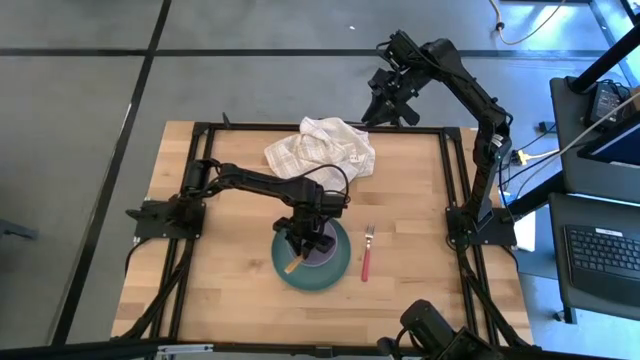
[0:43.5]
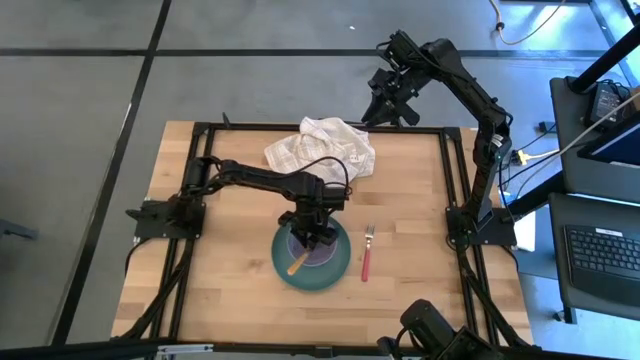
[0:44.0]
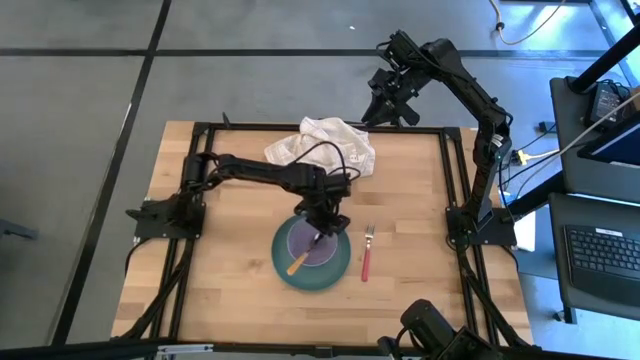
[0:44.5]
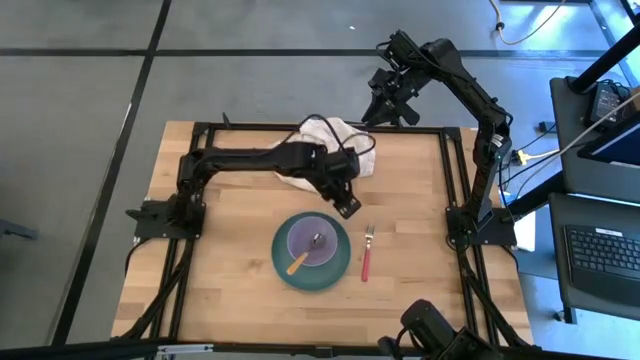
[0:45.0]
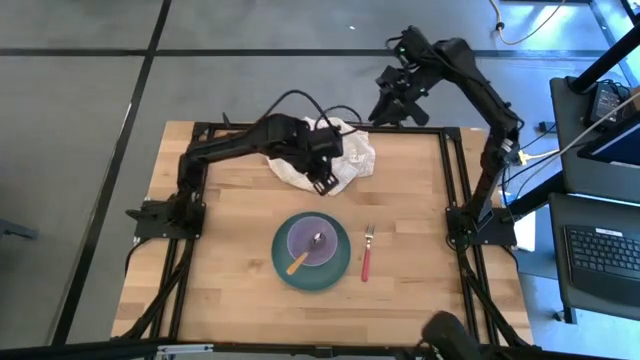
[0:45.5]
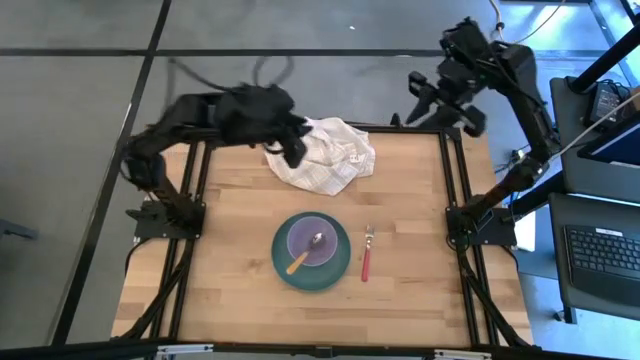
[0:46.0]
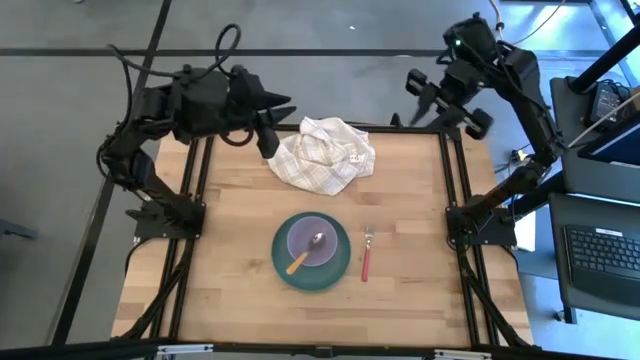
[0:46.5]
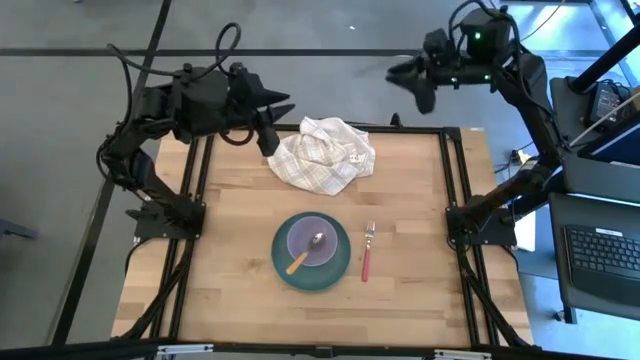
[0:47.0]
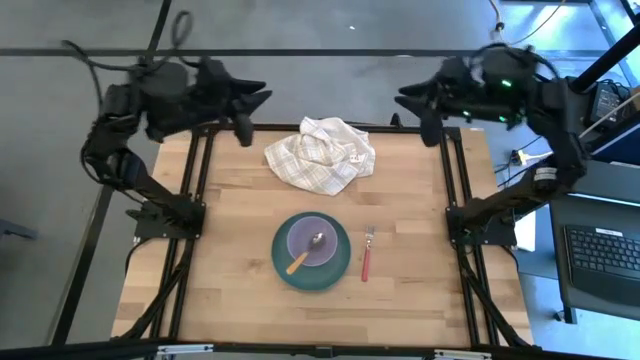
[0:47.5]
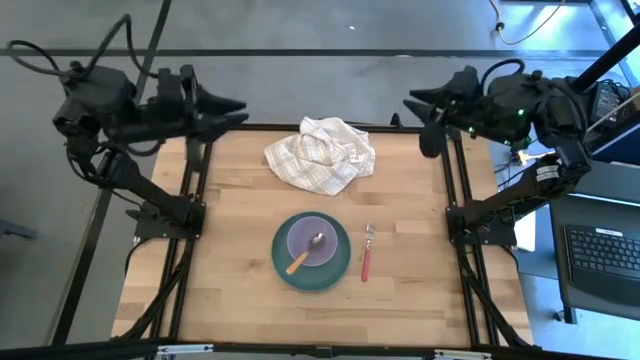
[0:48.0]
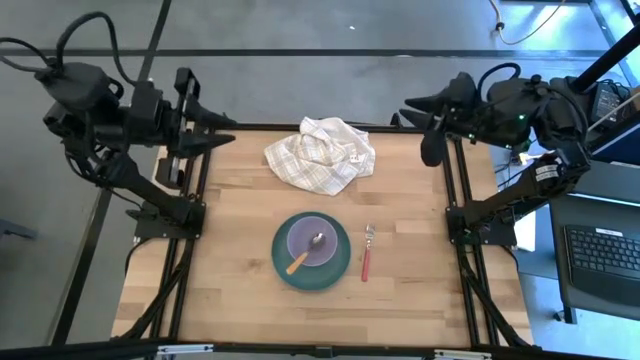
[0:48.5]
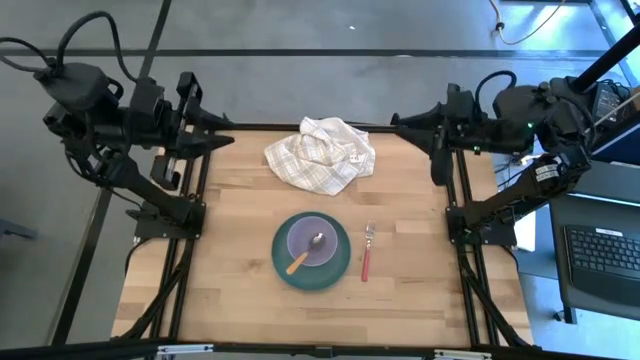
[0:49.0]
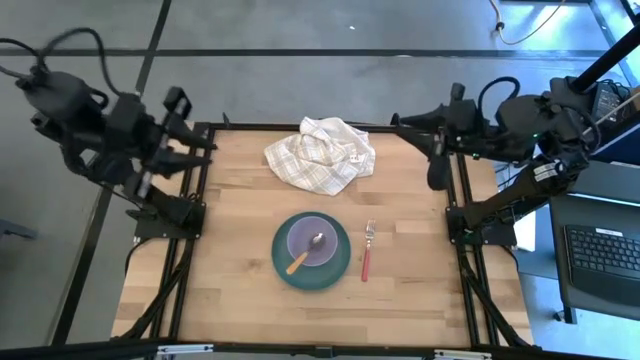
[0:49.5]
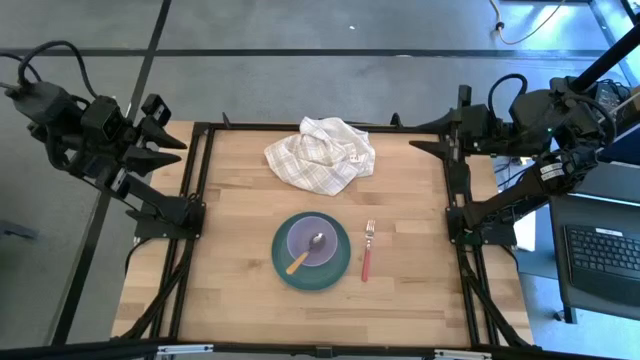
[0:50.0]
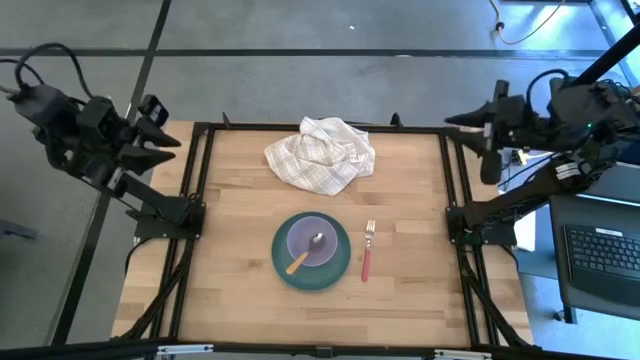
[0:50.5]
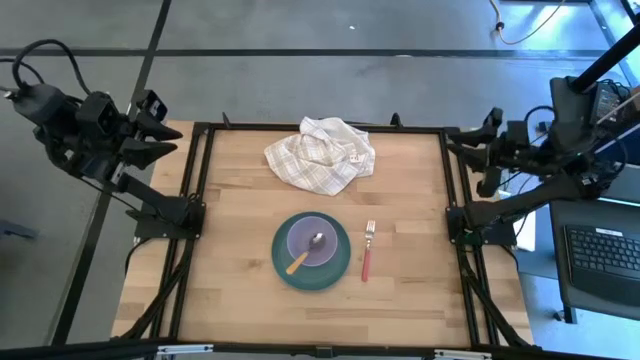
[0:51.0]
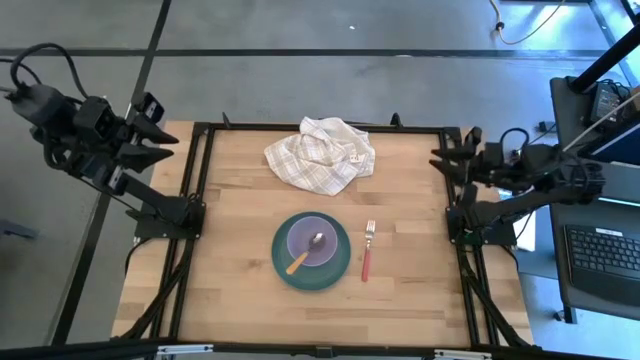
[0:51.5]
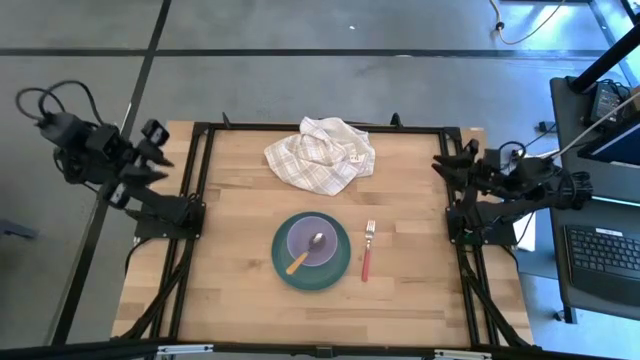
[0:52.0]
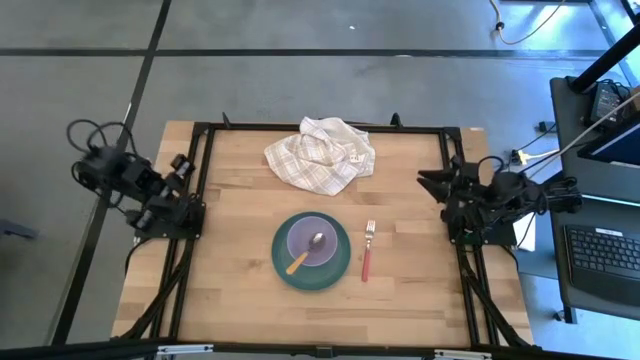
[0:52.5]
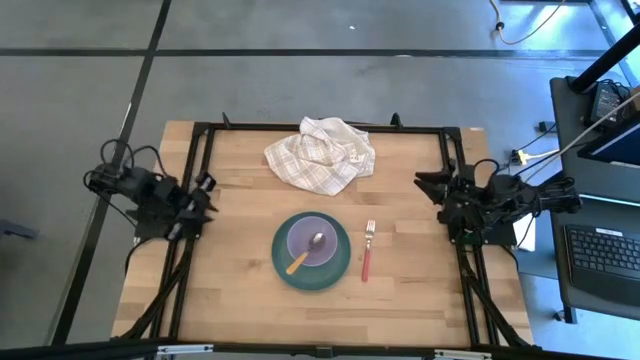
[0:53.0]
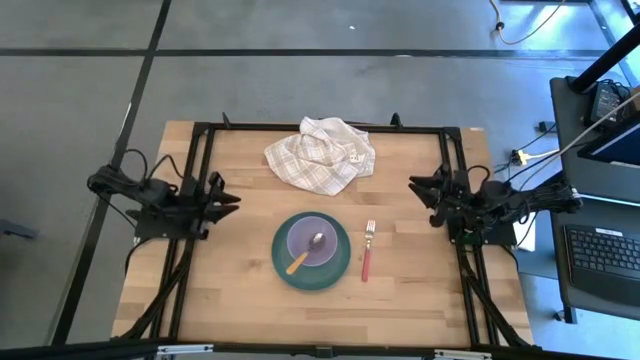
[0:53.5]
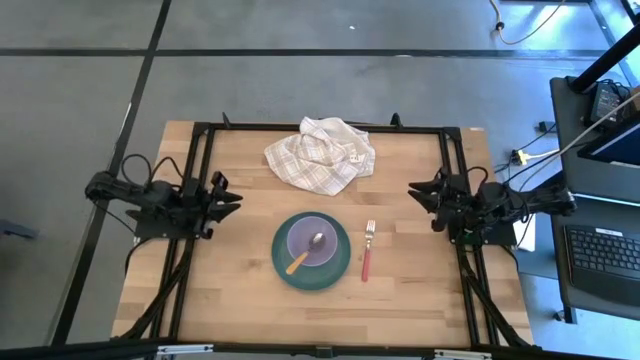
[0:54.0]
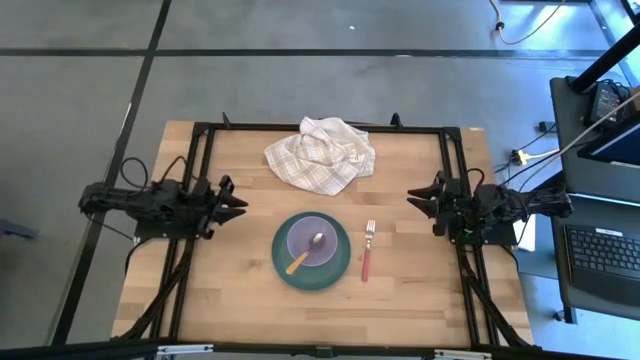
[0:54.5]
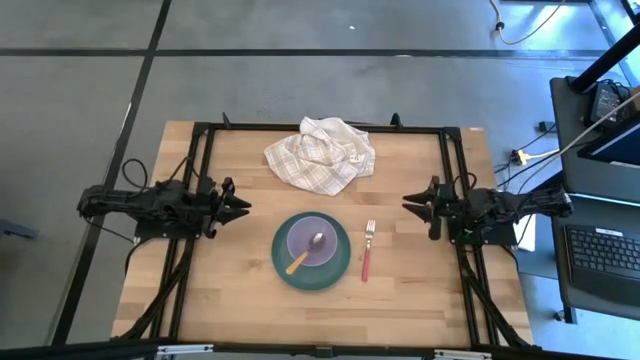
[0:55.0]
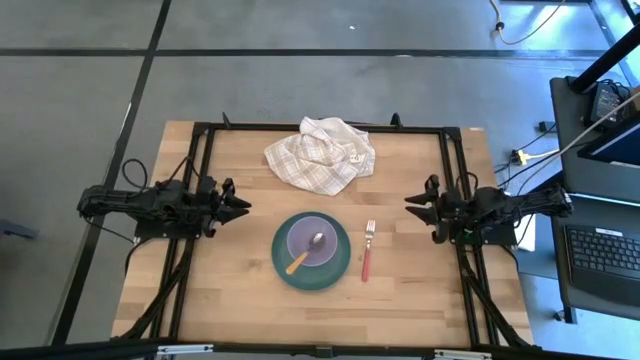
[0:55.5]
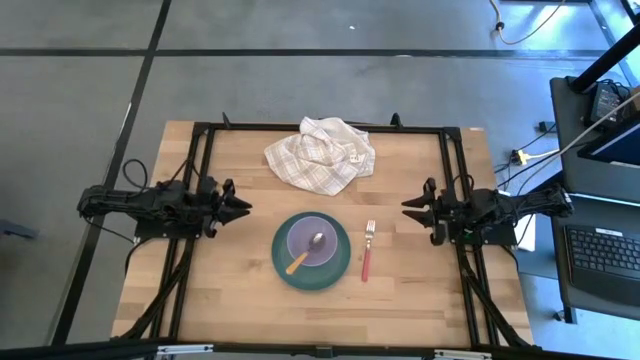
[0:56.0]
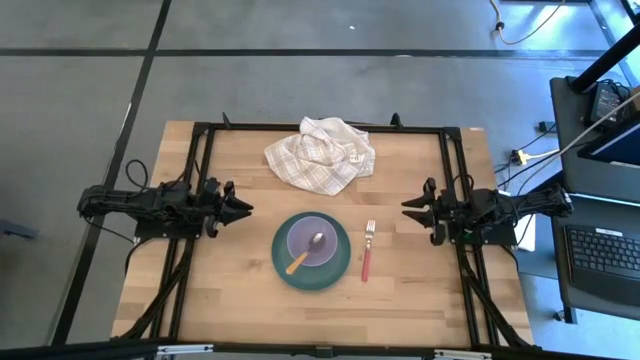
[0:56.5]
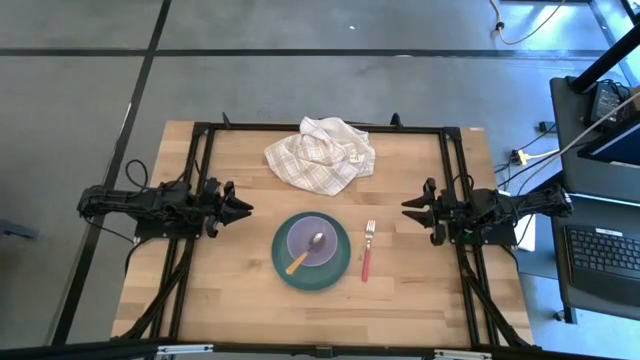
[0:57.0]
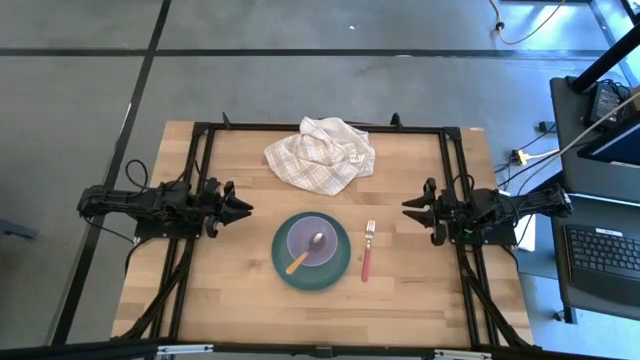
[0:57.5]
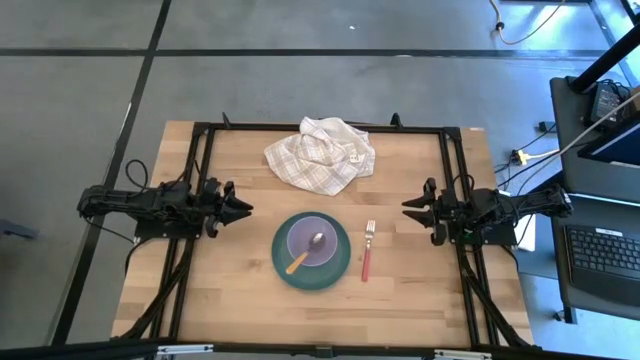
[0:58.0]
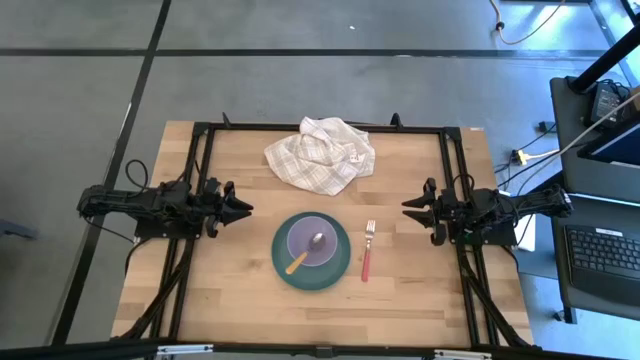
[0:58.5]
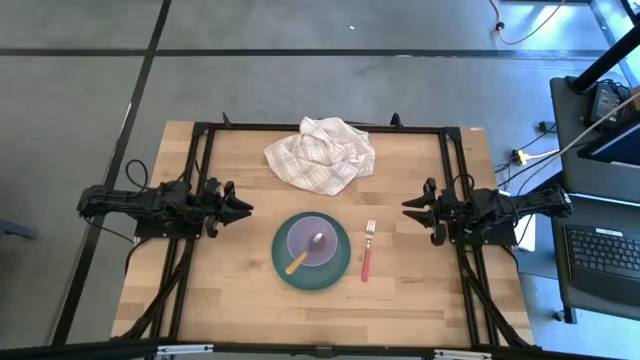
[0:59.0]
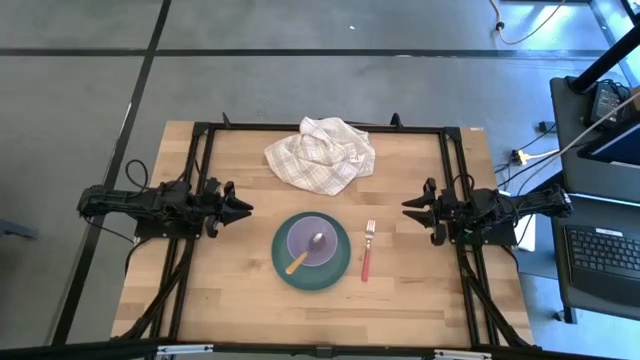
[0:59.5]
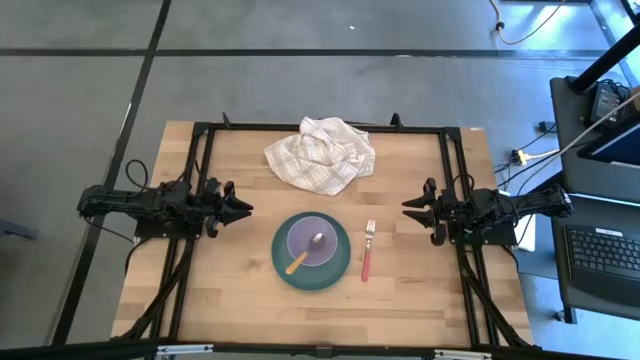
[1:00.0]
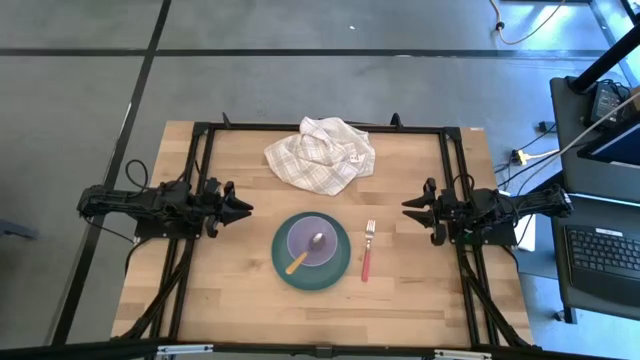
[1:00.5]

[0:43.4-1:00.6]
Task: Set table place
Return to Home Position

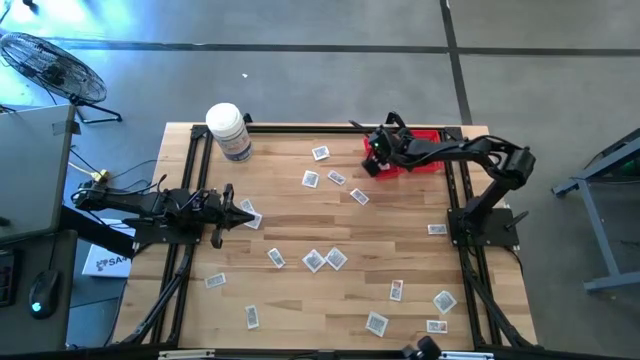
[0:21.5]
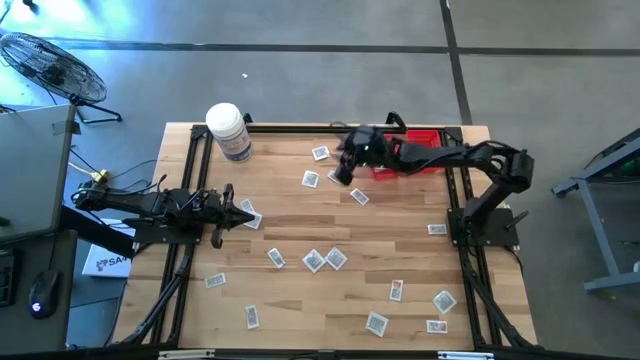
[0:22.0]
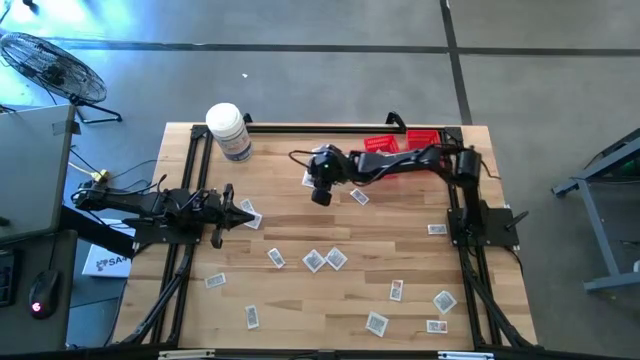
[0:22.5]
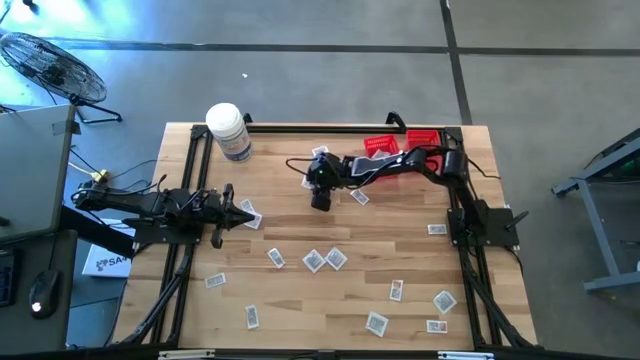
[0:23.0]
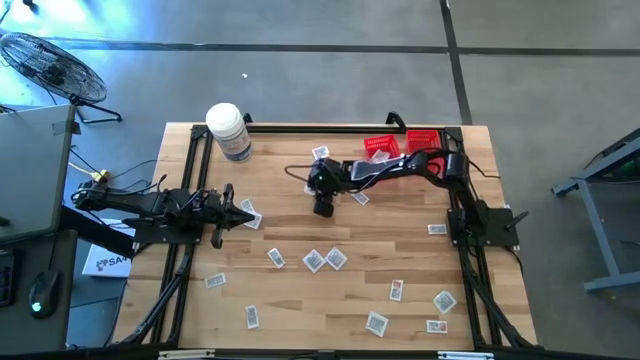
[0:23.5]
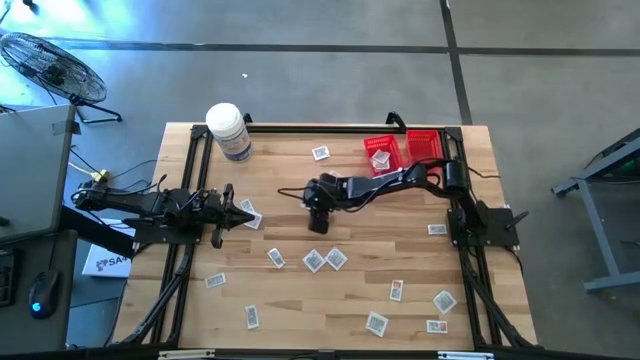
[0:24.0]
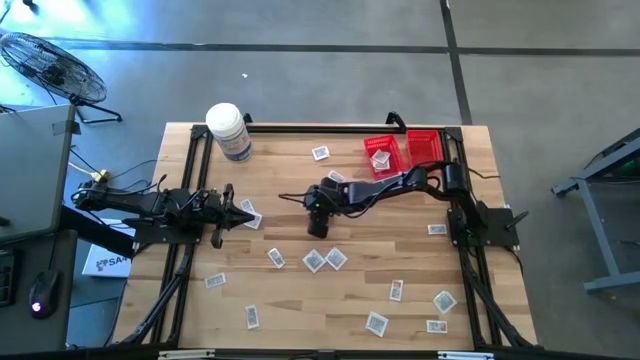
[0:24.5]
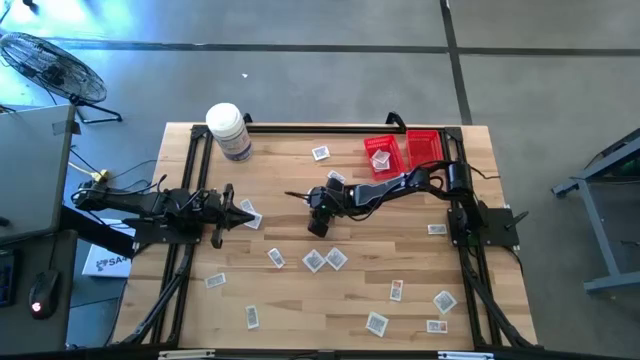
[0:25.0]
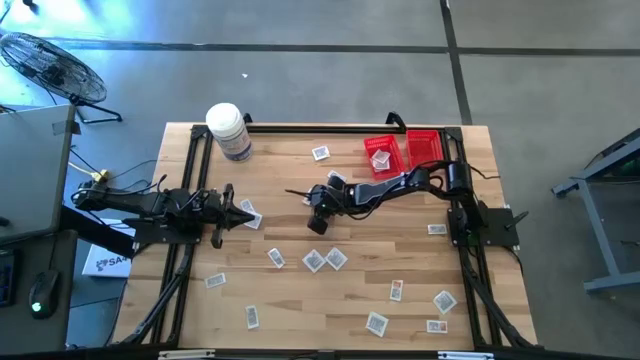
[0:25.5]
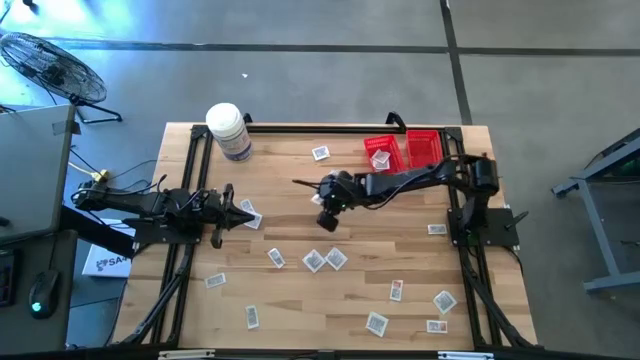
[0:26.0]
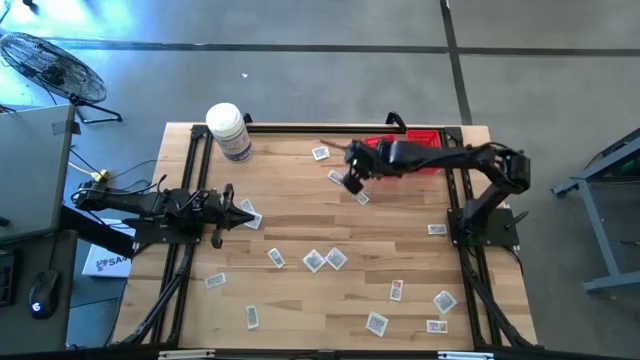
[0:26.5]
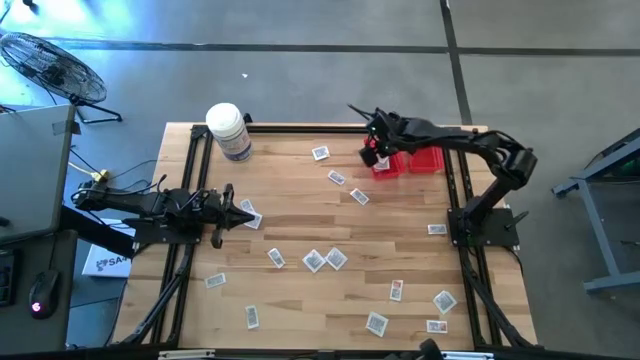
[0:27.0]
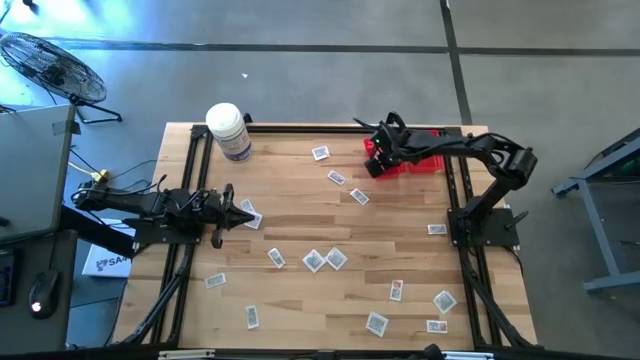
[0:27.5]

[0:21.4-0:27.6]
Task: Pick & Place First Aid Supplies
Put the towelette pack into the left red bin
